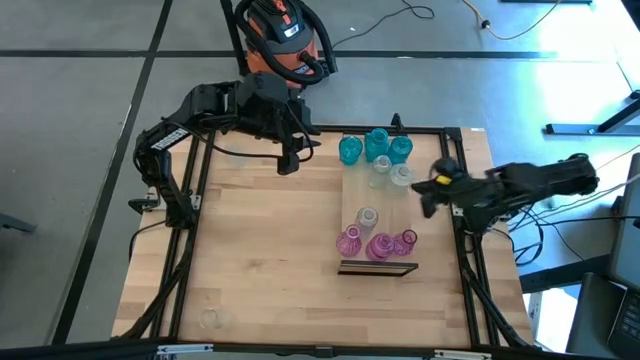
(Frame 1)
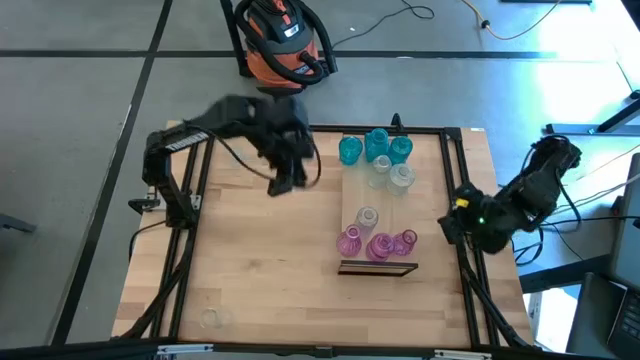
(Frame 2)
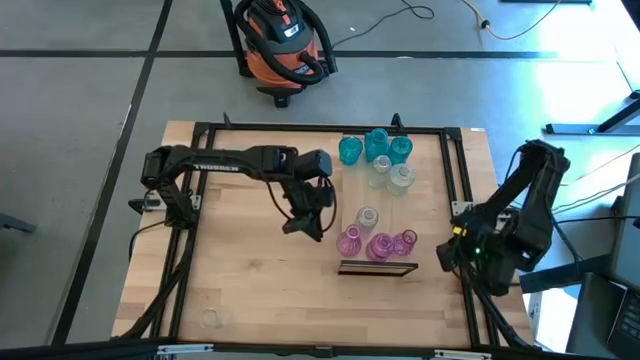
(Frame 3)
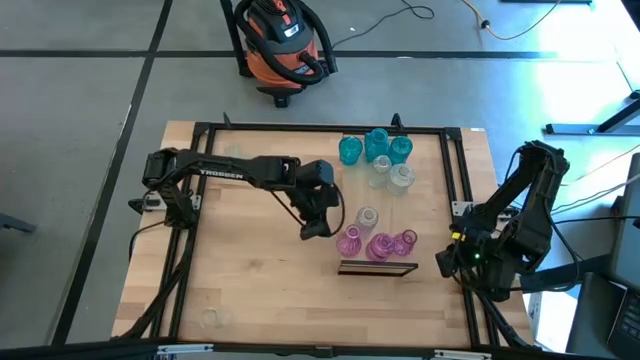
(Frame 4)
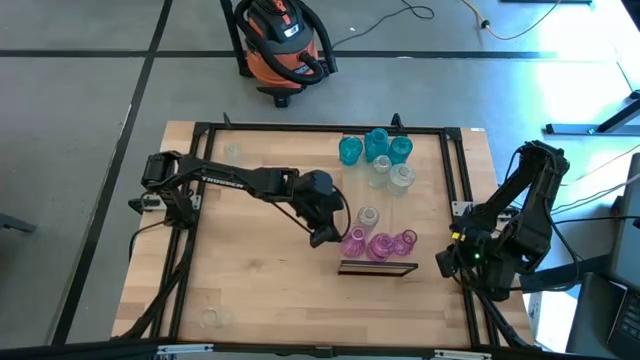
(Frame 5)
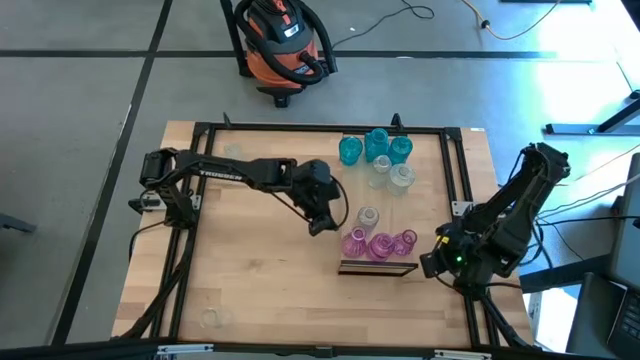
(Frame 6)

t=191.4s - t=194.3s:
Task: sort vases onto shelf
Adjust the pink vase on the shelf

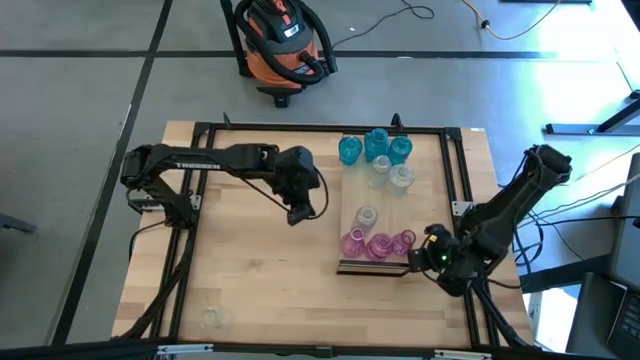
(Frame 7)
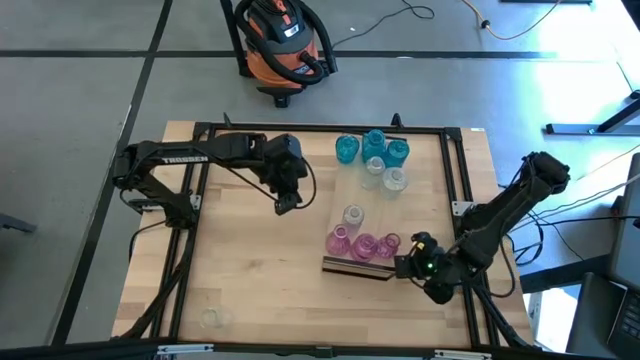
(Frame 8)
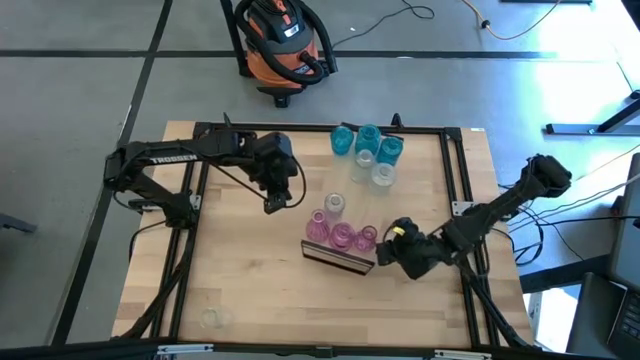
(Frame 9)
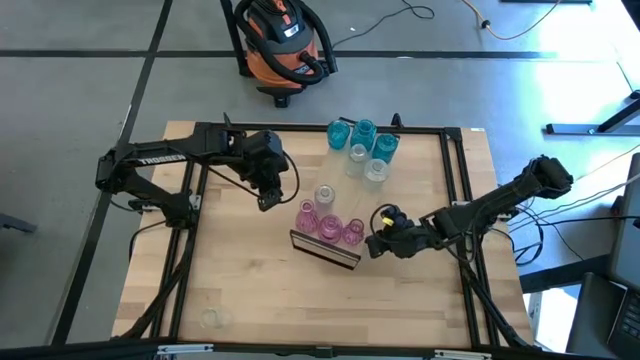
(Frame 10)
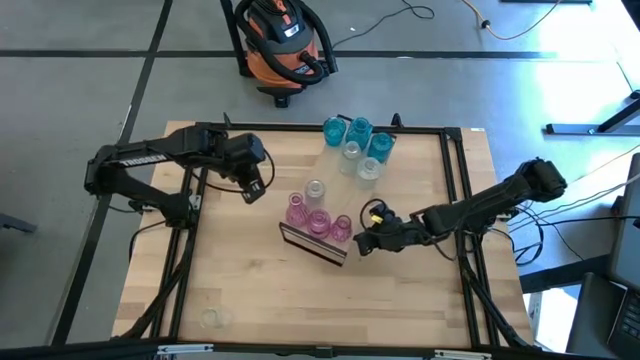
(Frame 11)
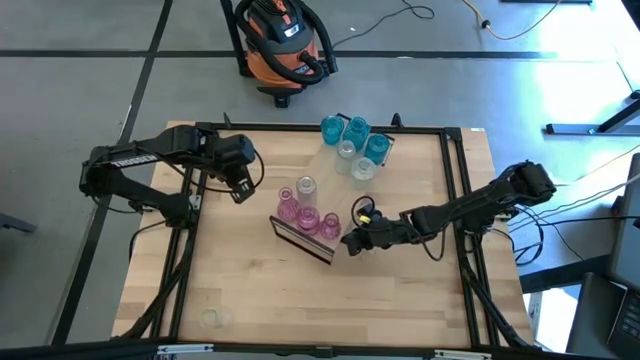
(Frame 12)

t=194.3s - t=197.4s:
Adjust the shelf

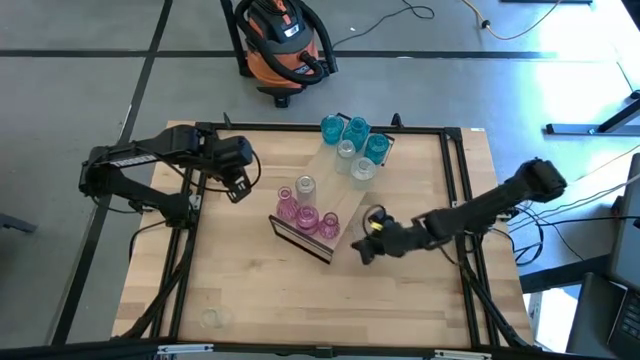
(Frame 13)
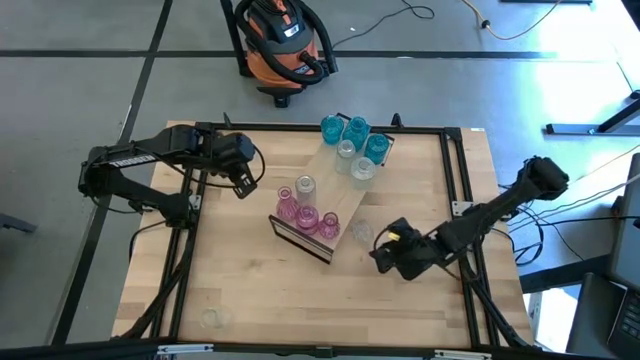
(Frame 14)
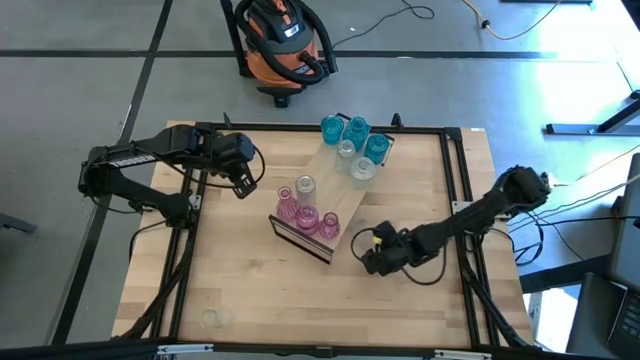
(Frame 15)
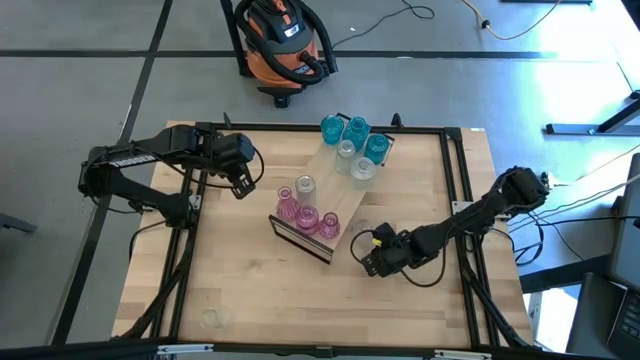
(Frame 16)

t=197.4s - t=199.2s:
Put the transparent vase on the shelf

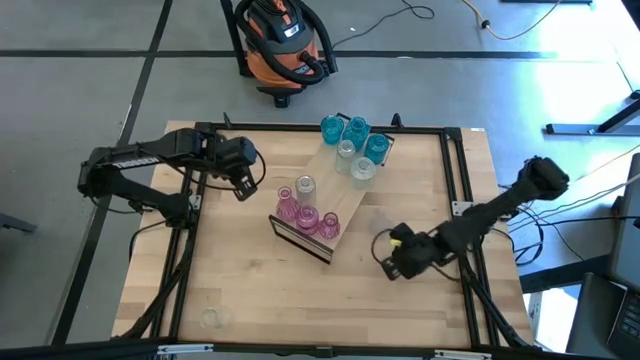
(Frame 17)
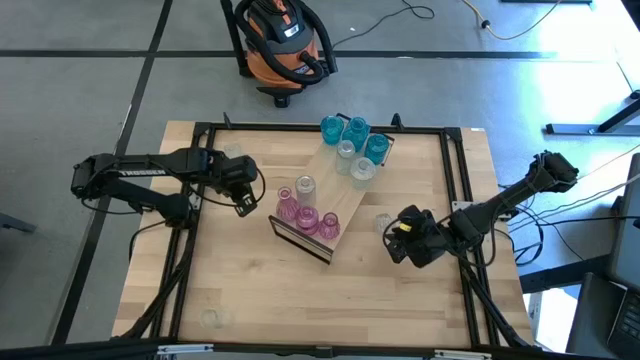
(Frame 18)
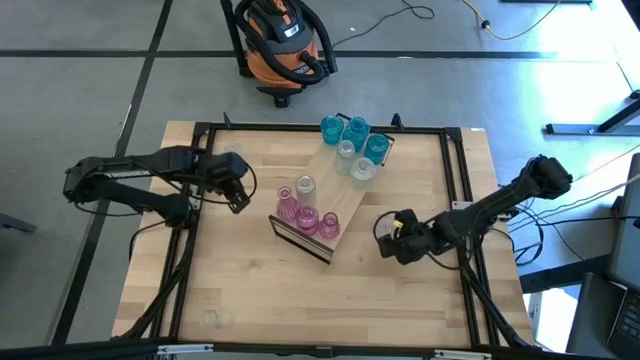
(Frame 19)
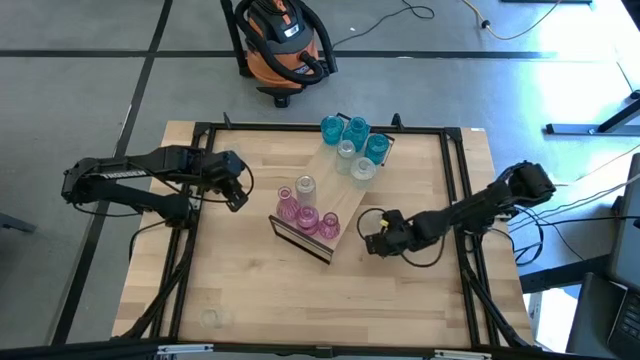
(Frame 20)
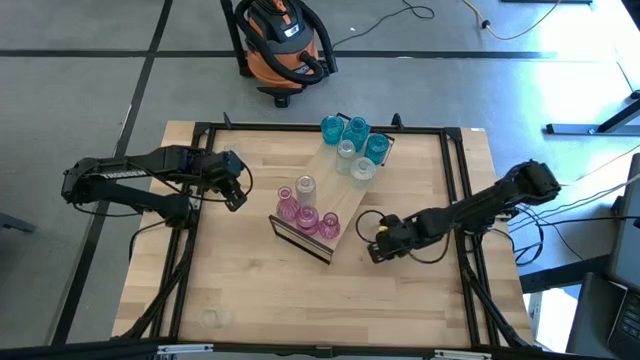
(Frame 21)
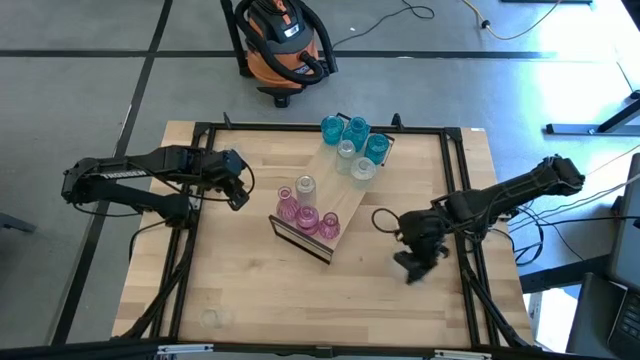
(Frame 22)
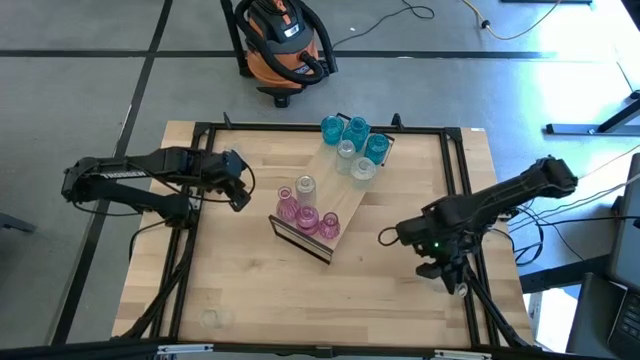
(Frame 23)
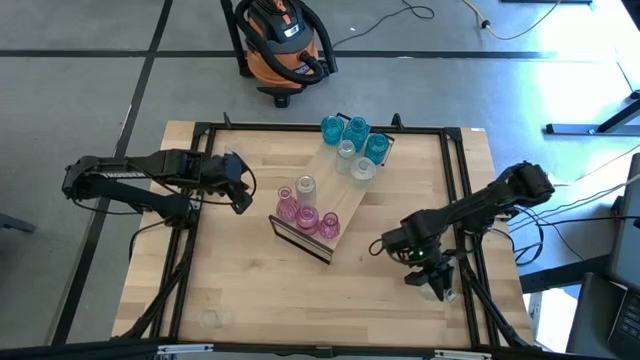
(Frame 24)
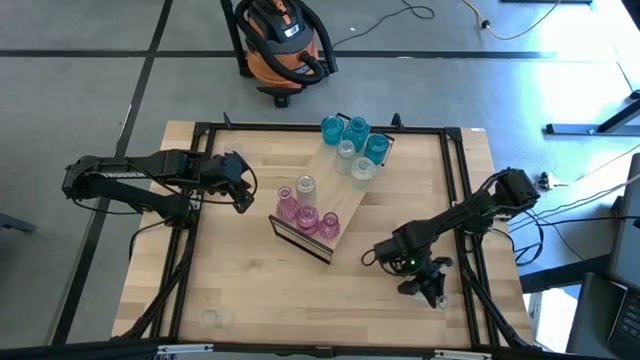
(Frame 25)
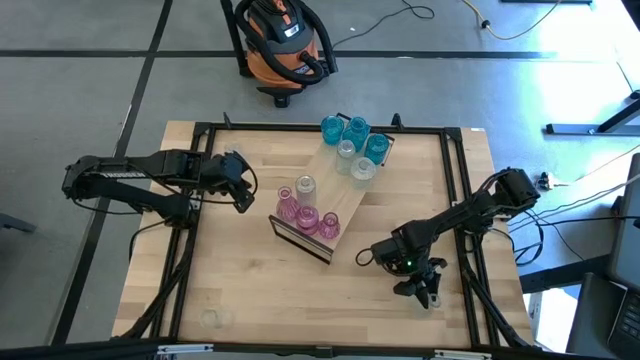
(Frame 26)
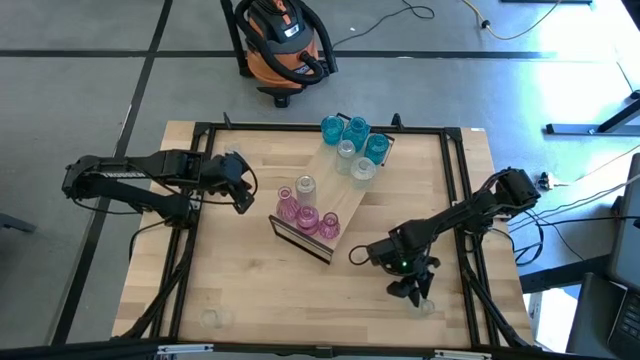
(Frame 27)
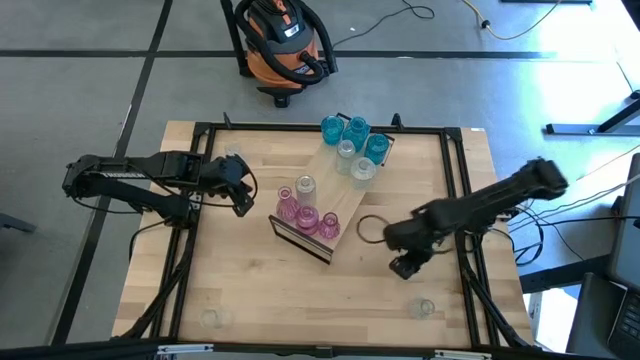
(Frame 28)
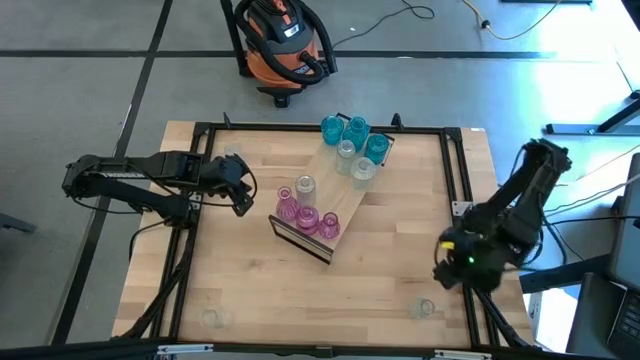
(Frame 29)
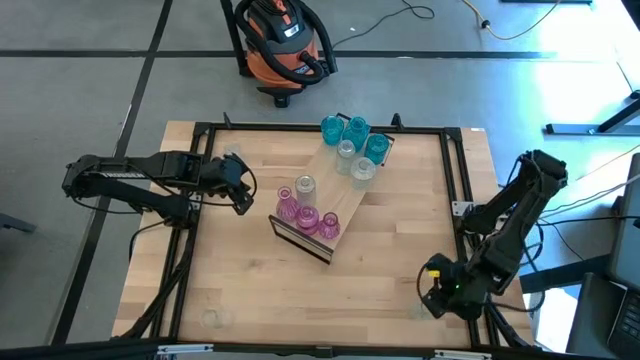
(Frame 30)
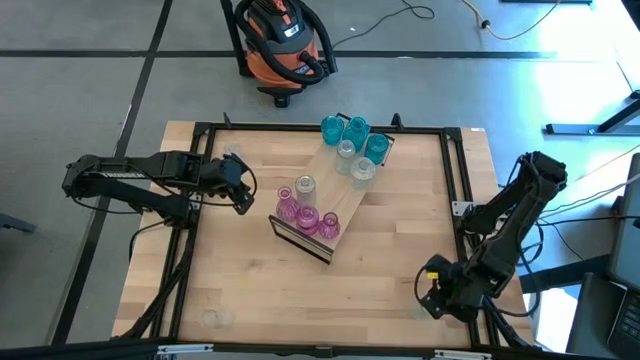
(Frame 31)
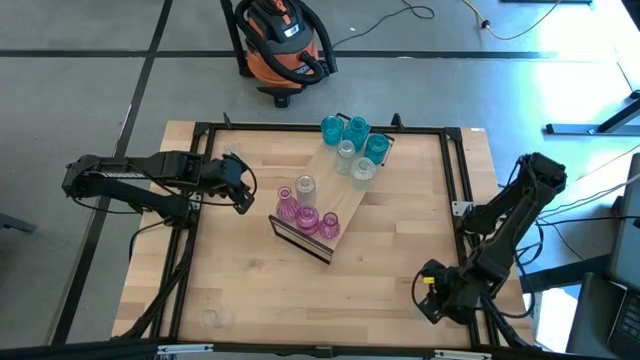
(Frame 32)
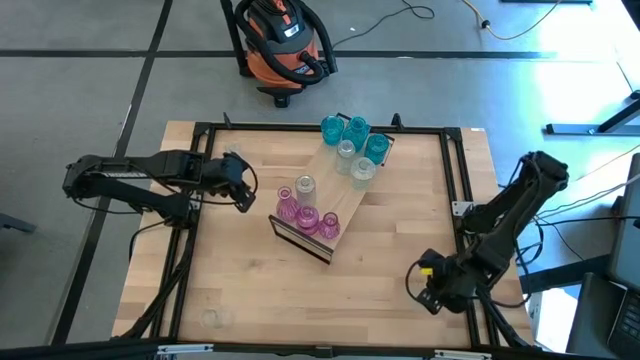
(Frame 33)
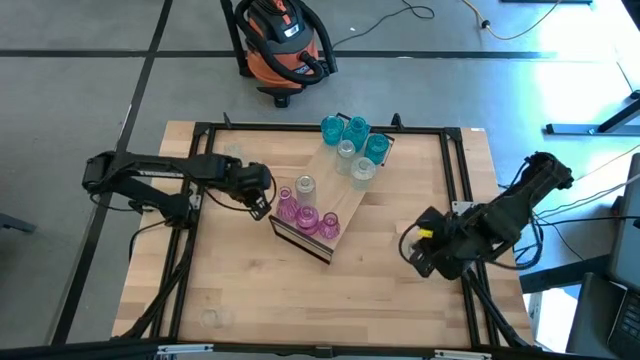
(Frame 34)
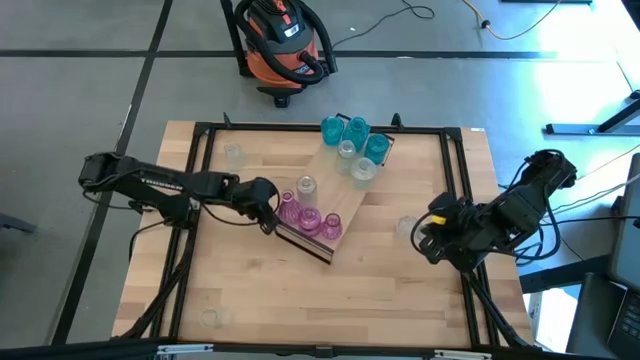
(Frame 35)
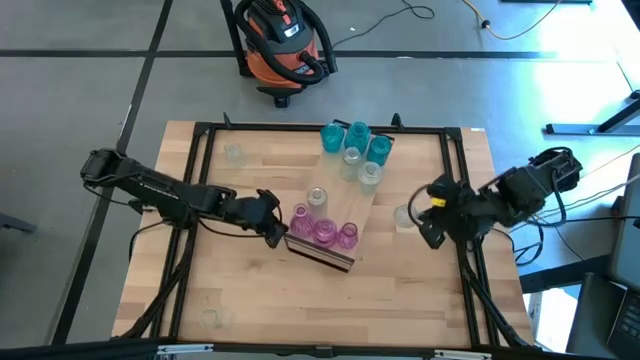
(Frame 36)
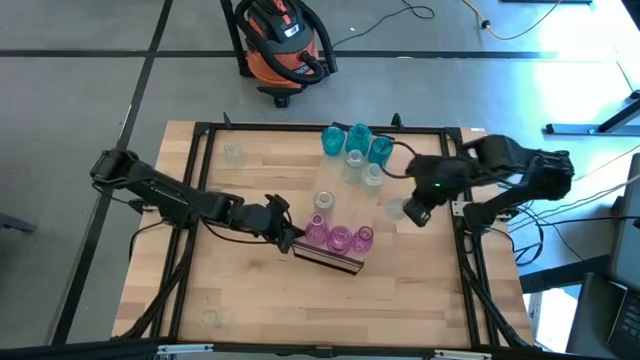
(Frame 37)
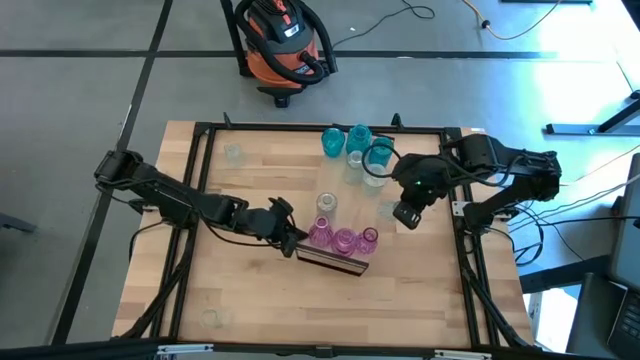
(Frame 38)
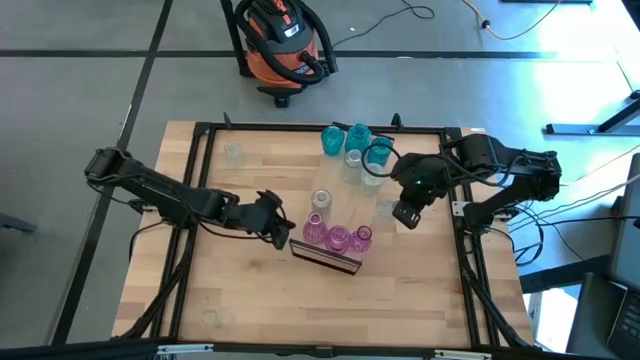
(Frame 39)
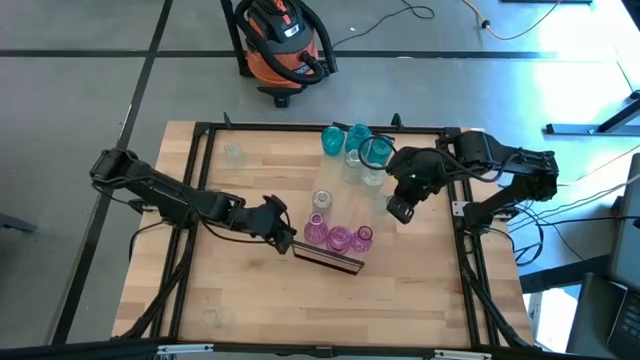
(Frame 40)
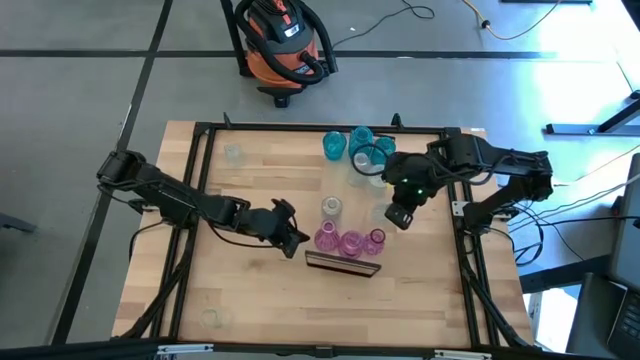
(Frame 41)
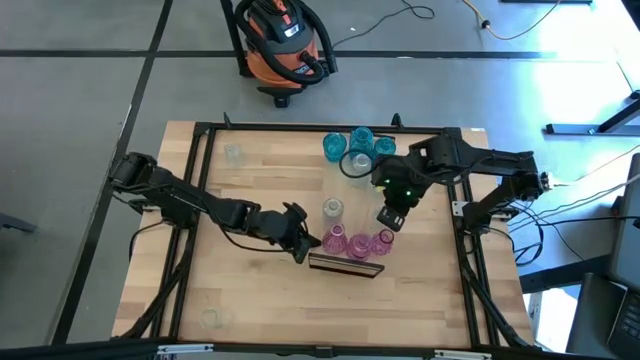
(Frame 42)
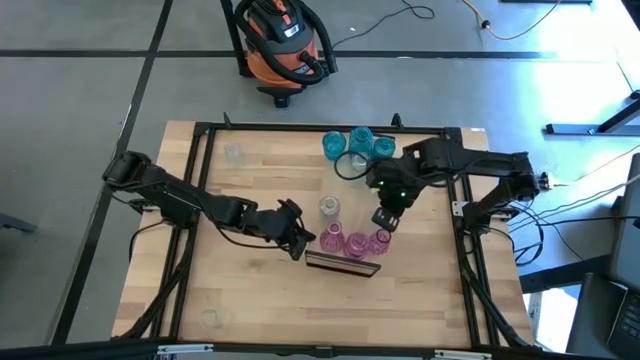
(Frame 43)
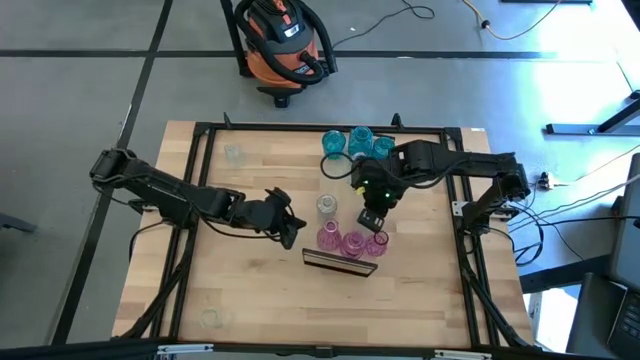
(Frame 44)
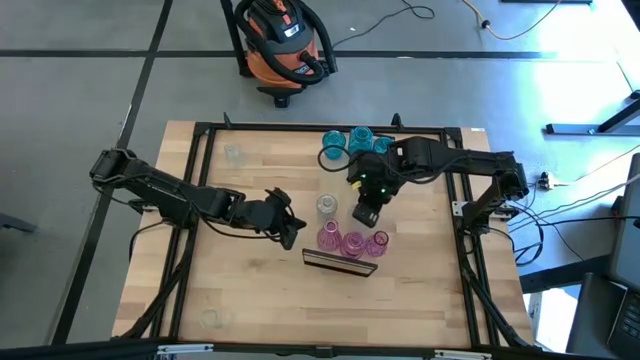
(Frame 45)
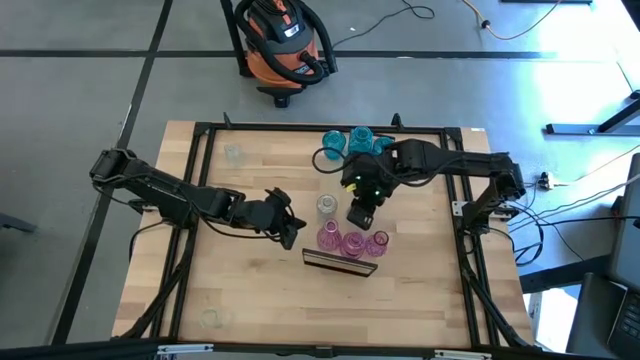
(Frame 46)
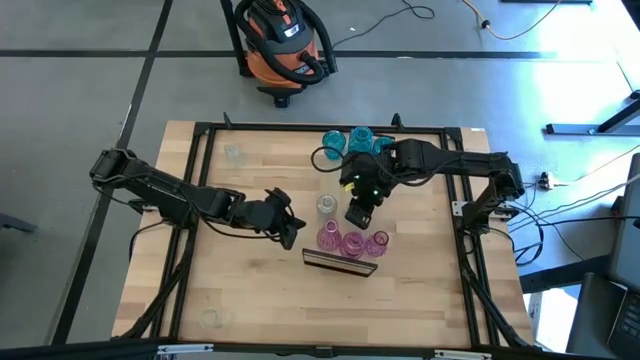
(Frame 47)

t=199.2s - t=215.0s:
Put the transparent vase on the shelf
